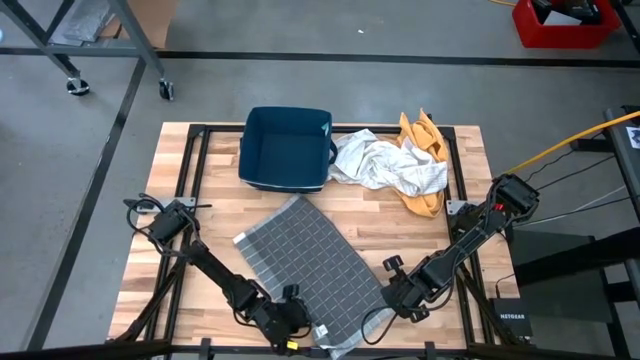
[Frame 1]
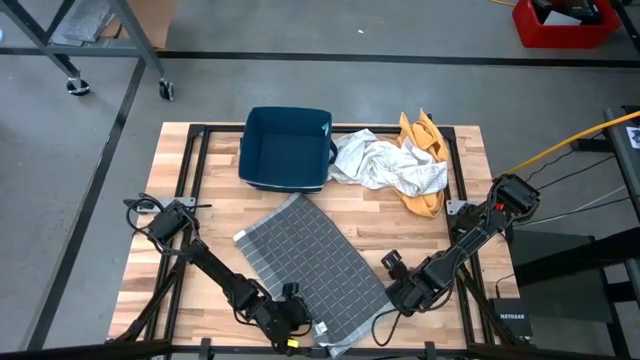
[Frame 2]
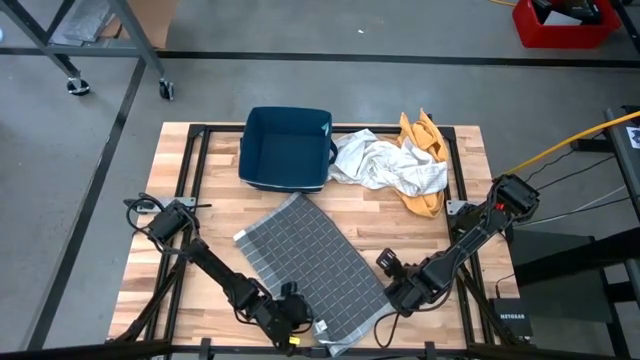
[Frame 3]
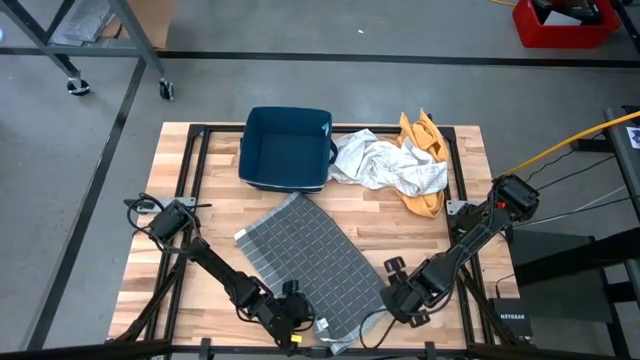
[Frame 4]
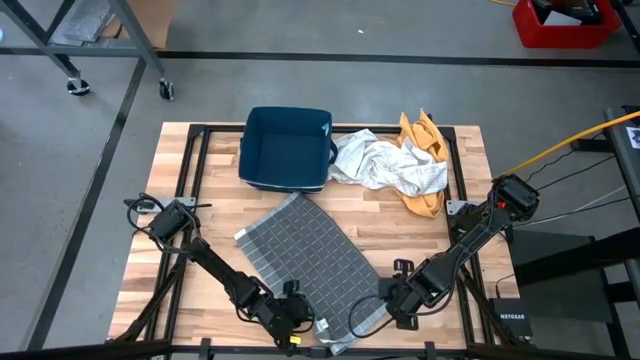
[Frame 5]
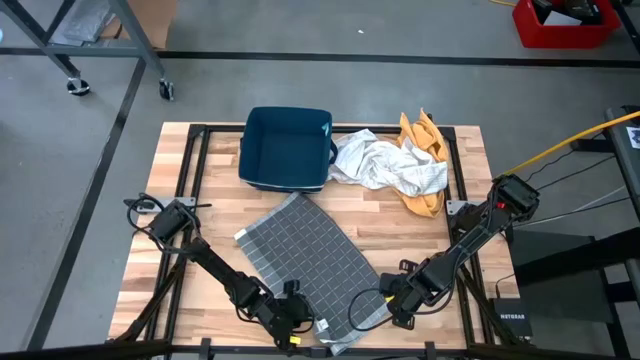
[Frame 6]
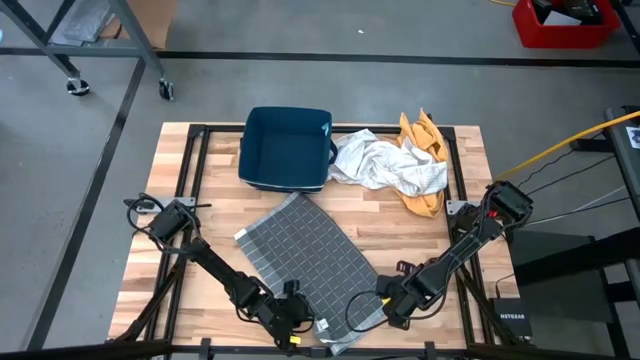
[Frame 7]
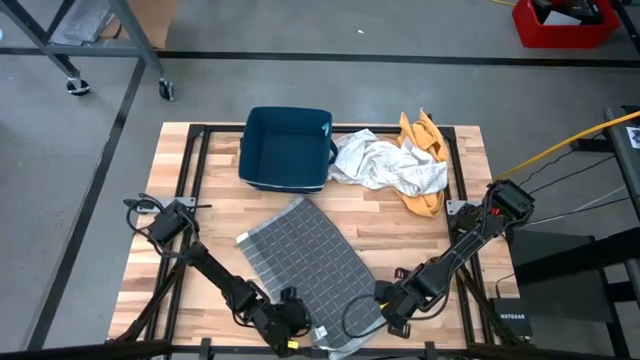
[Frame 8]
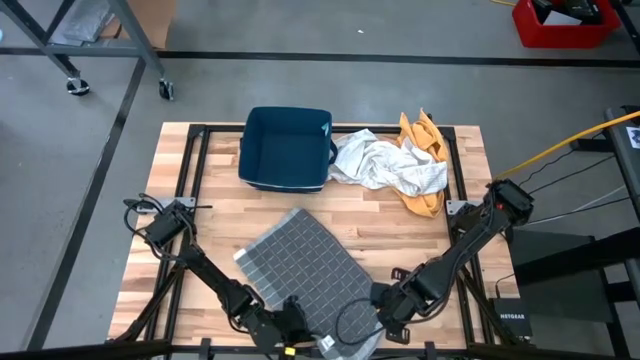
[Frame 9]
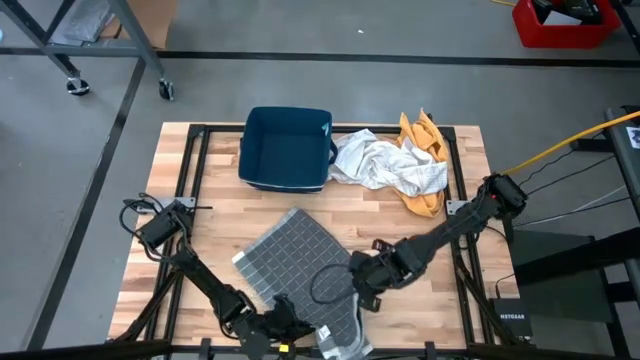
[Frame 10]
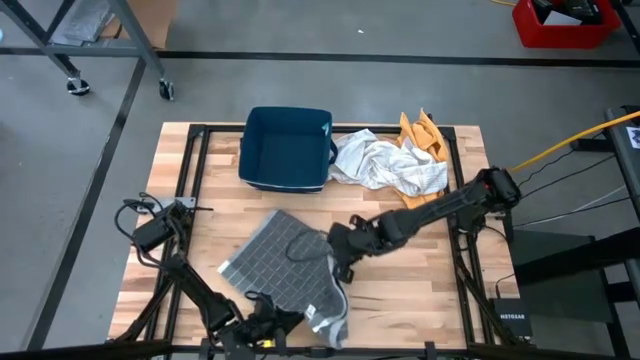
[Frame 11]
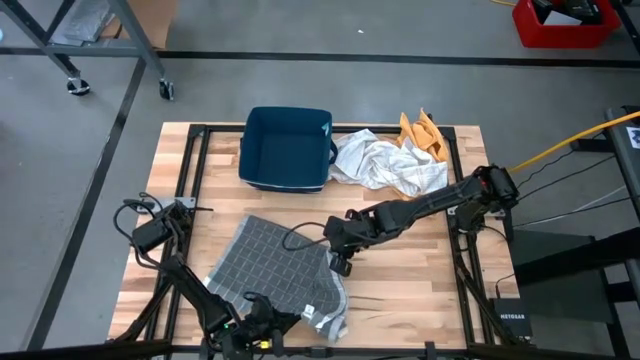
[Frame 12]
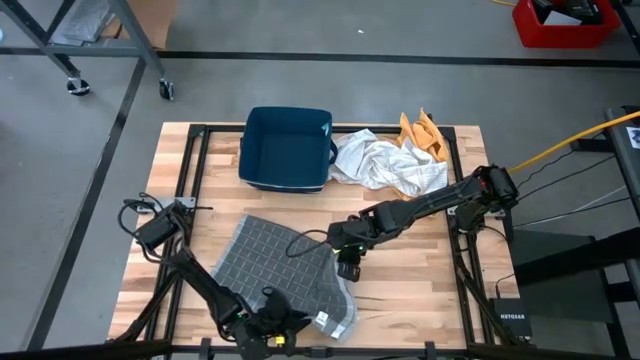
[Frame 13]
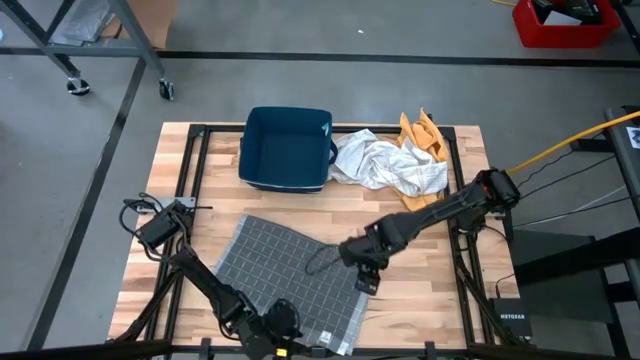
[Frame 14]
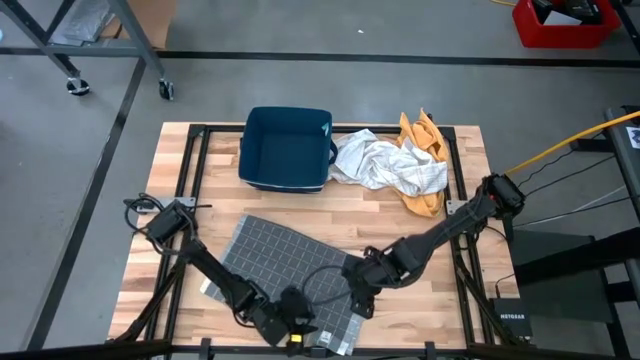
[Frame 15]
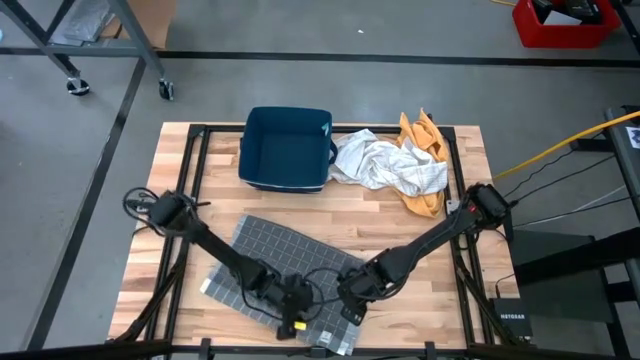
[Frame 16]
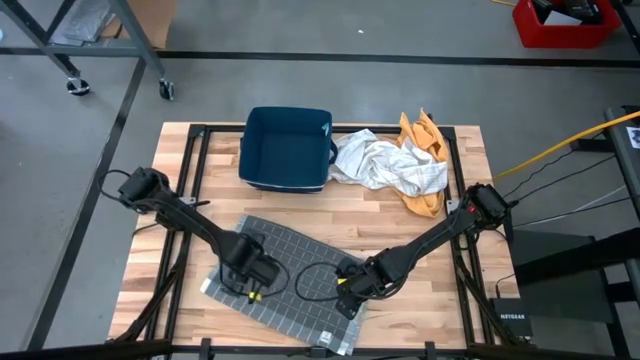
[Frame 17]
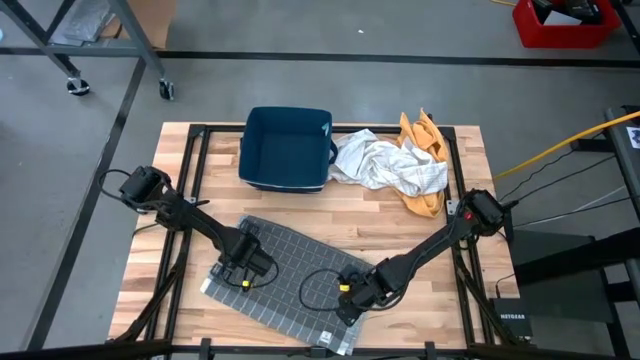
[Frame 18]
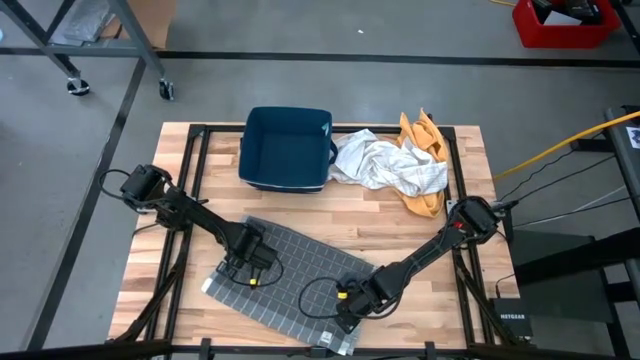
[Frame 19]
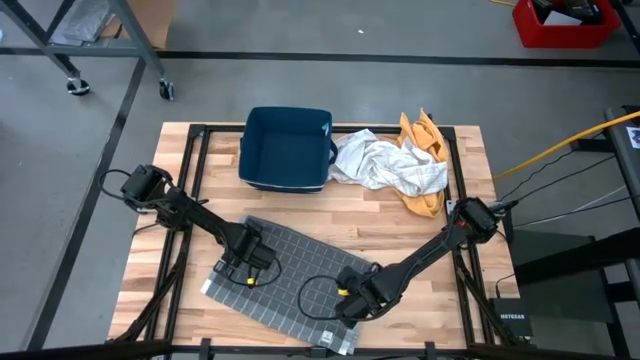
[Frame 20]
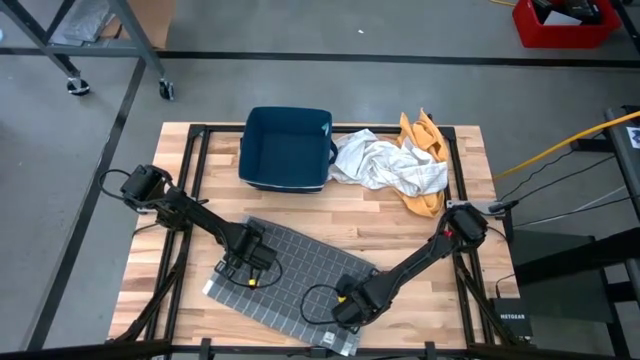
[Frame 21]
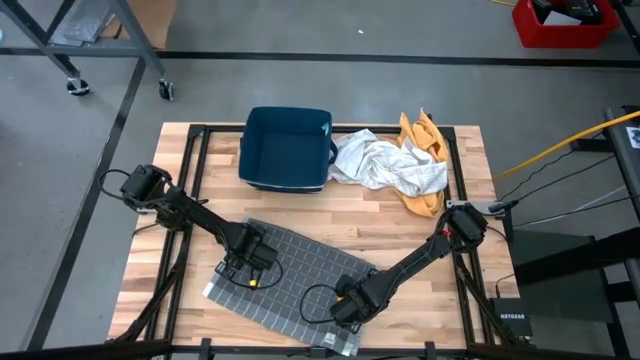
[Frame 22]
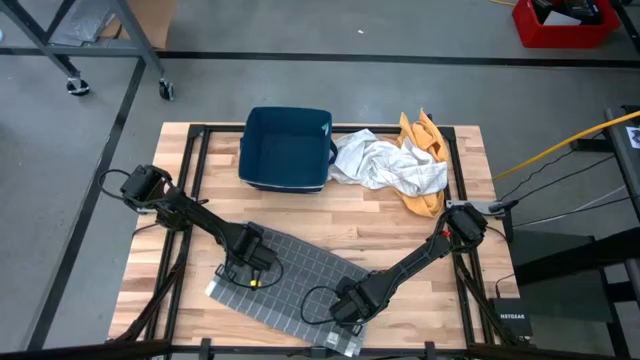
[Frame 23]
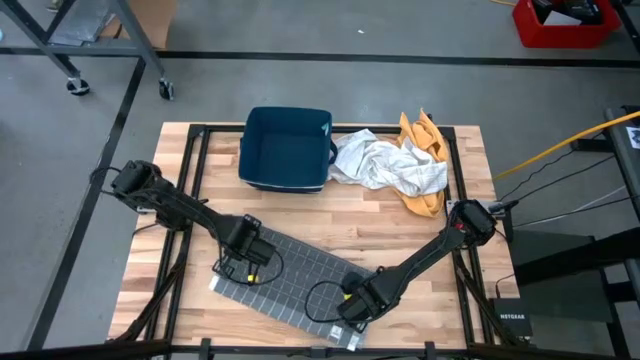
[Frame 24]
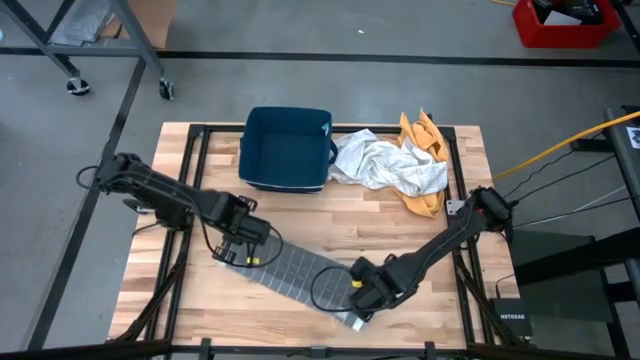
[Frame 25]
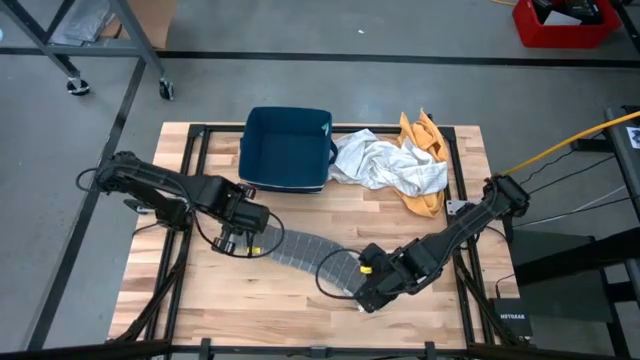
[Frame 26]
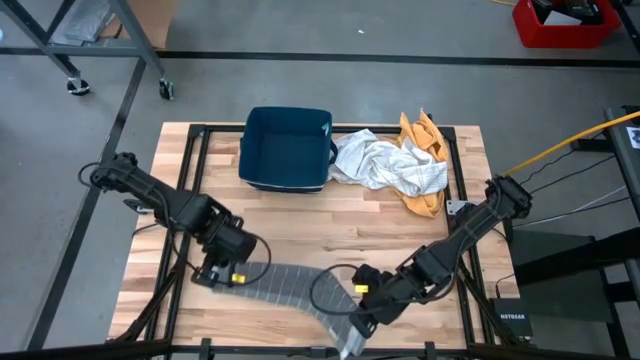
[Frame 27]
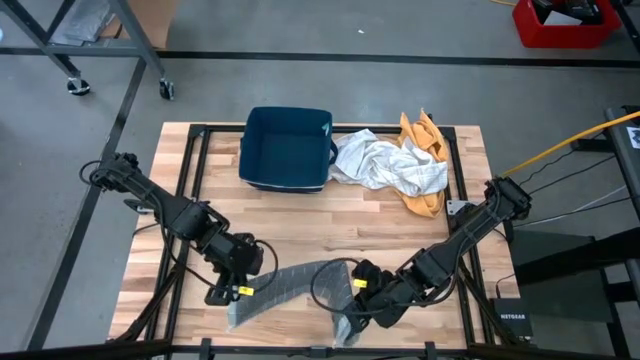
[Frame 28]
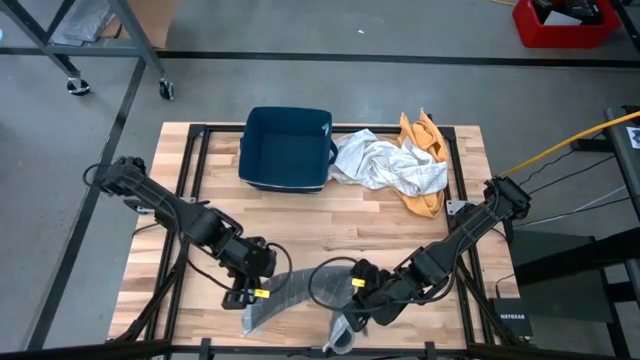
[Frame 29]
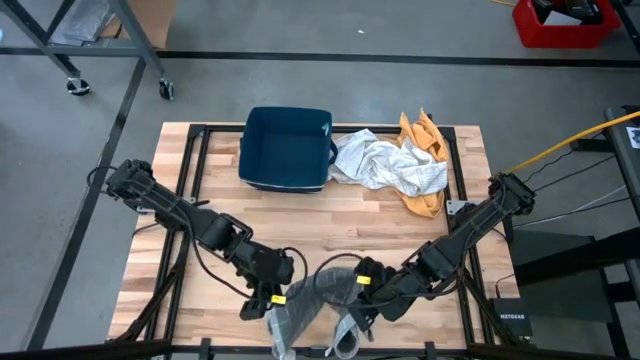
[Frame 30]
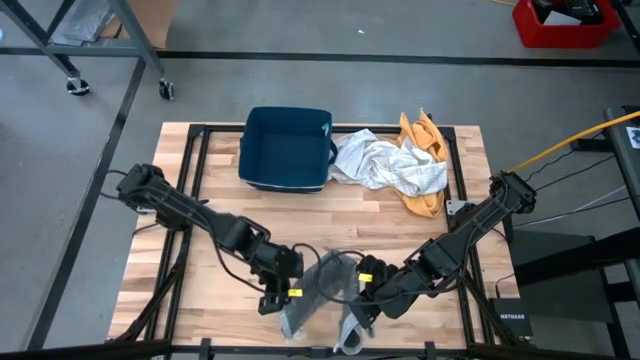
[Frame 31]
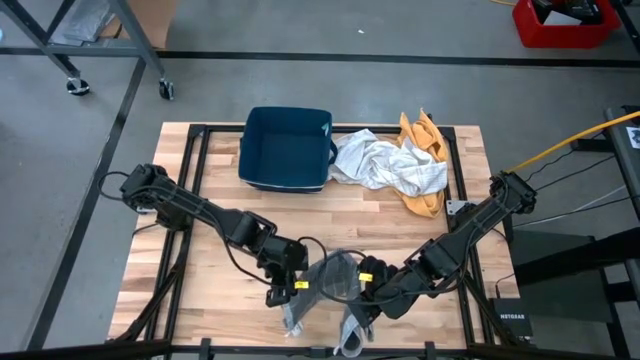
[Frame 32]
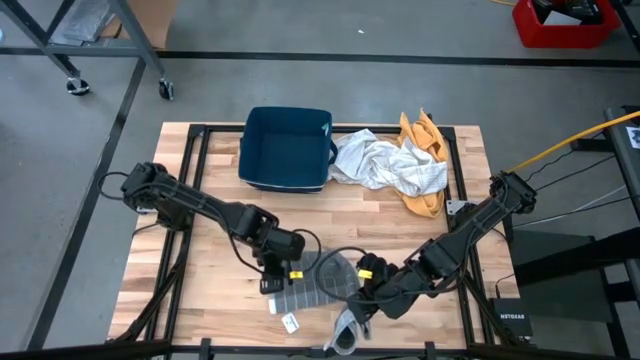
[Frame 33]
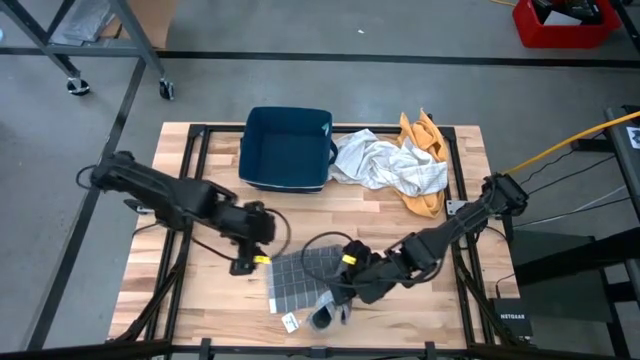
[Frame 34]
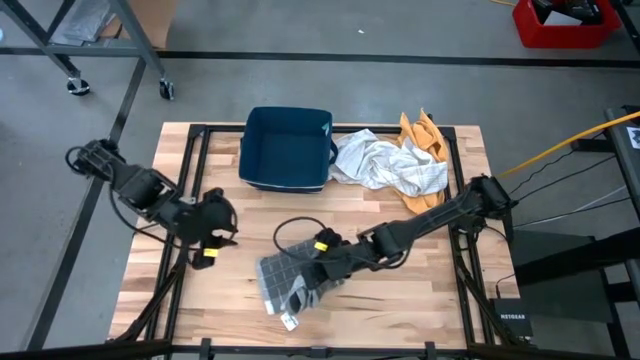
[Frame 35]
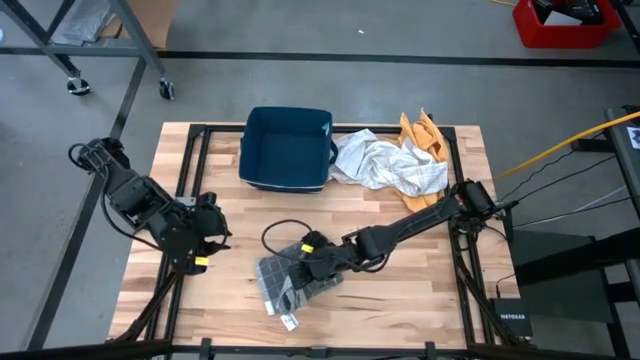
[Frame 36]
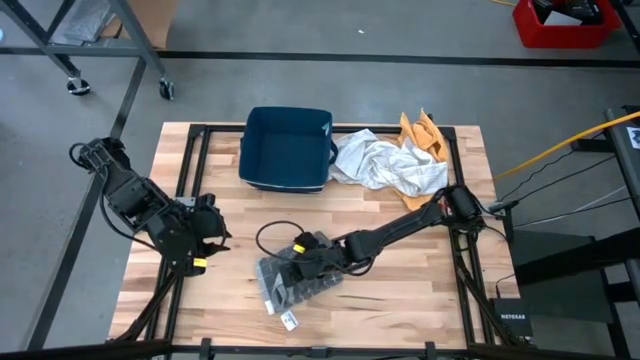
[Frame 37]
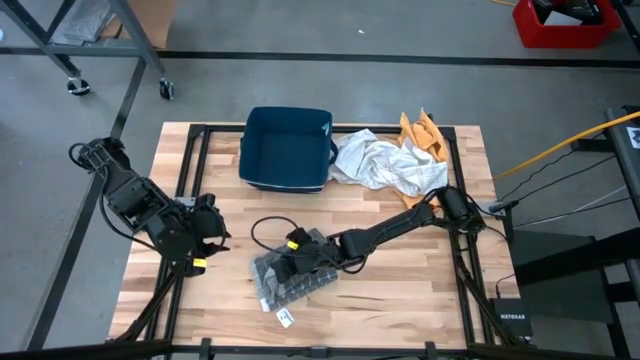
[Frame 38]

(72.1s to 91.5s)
Task: Fold towel
Fold the gray patterned towel

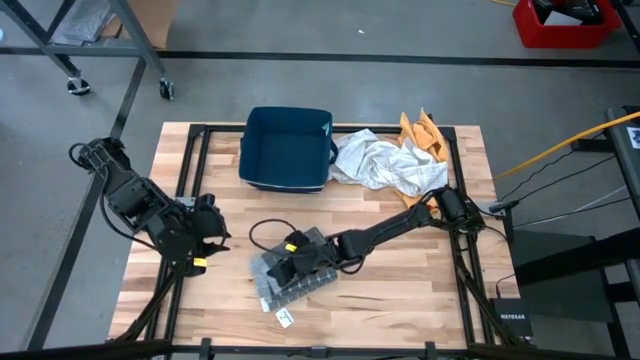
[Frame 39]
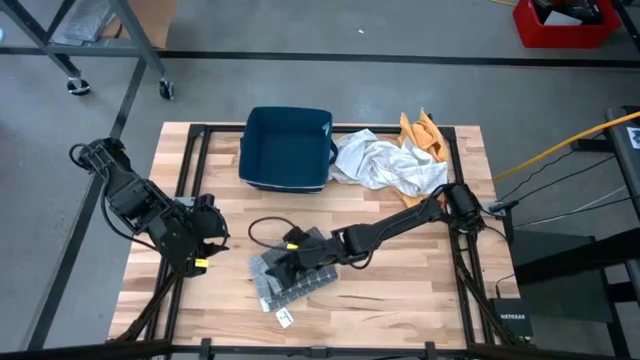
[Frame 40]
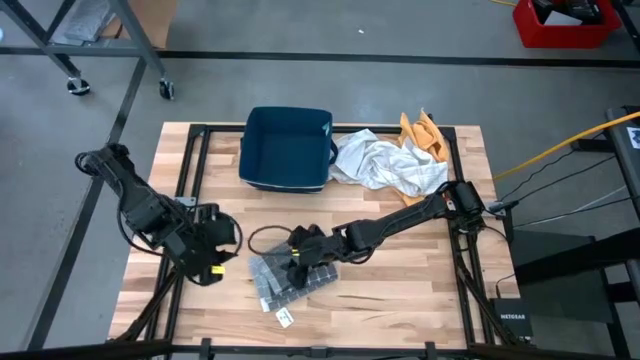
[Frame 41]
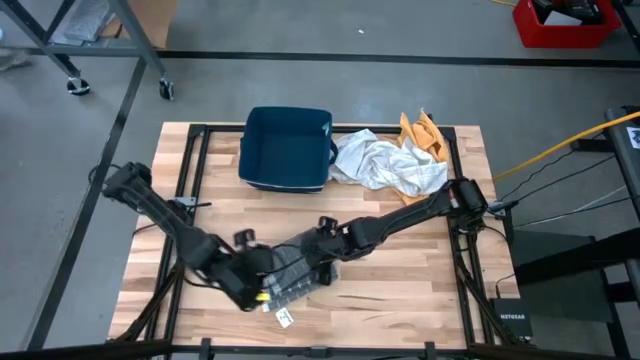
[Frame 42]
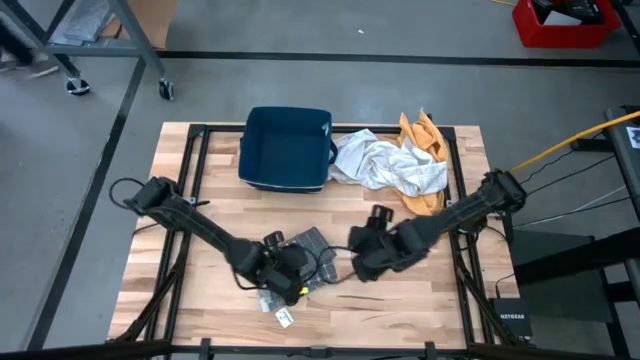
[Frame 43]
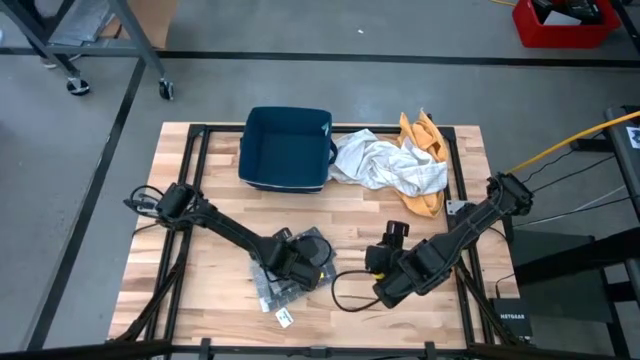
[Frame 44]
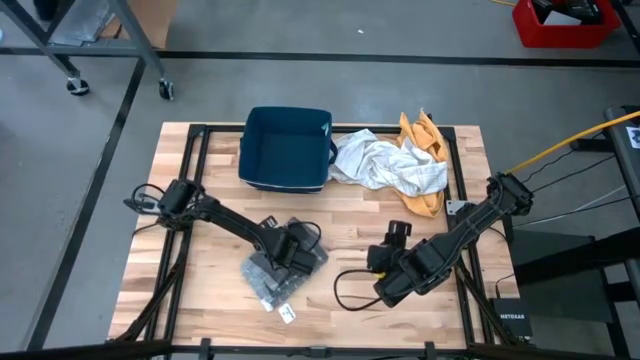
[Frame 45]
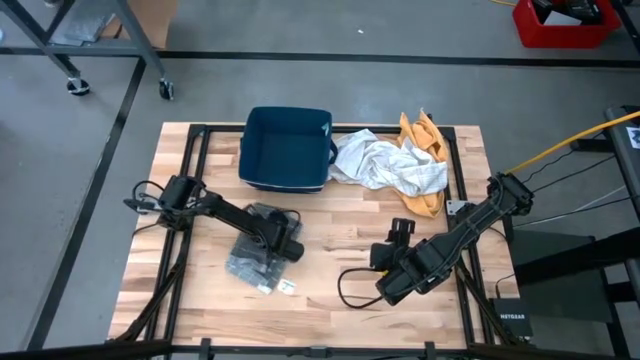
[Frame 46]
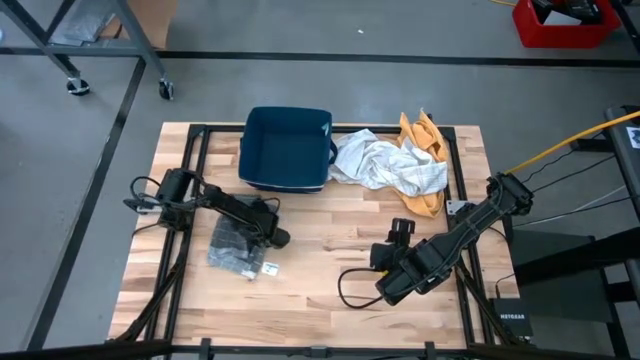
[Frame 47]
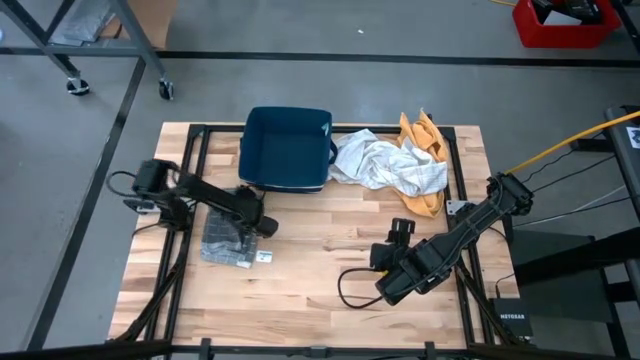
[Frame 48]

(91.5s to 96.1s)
Move the gray patterned towel to the top left
